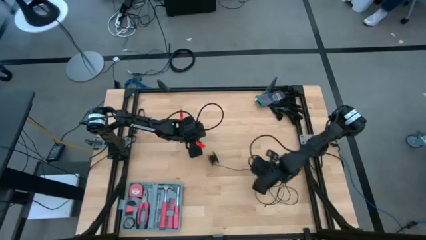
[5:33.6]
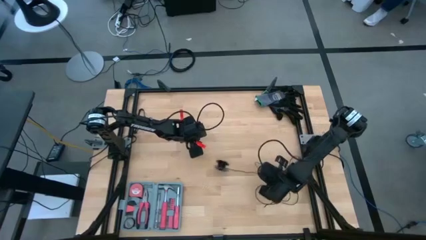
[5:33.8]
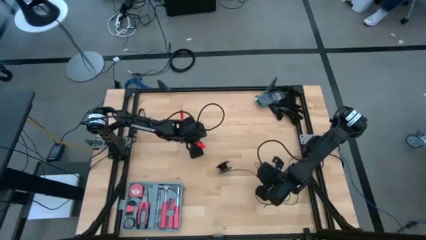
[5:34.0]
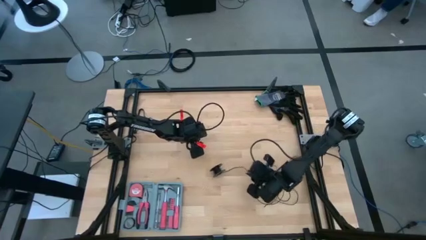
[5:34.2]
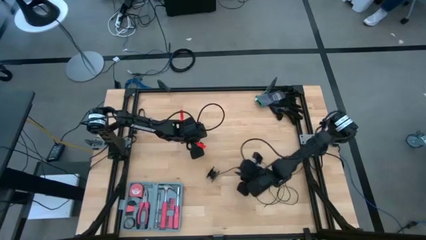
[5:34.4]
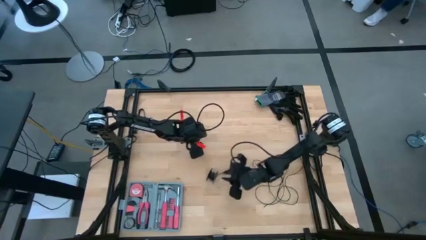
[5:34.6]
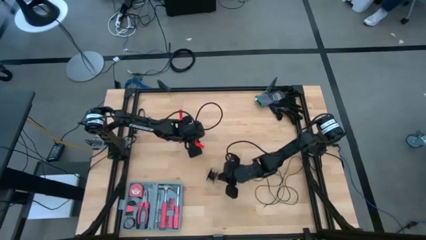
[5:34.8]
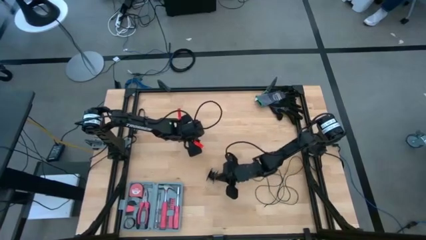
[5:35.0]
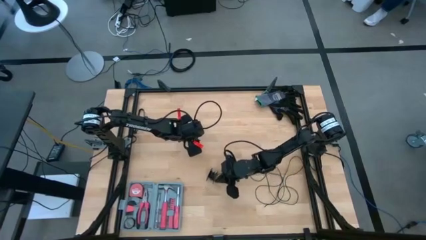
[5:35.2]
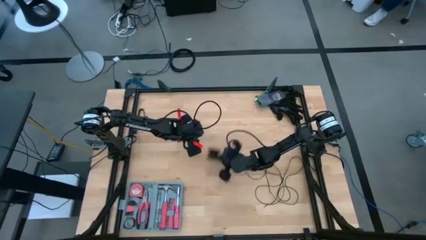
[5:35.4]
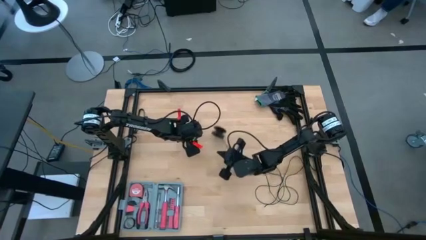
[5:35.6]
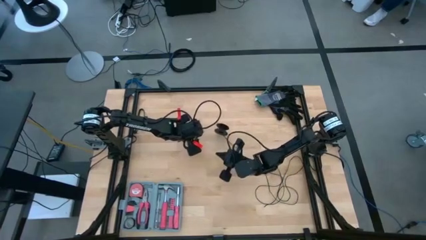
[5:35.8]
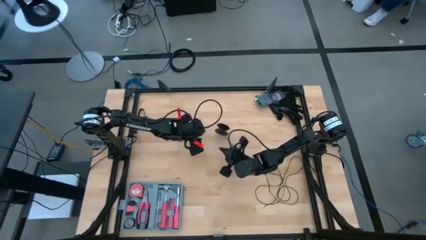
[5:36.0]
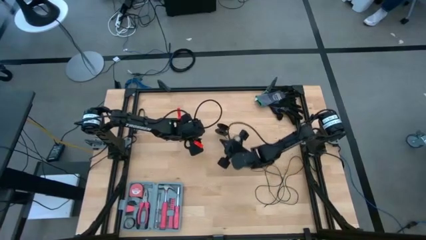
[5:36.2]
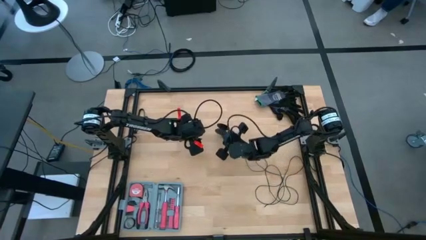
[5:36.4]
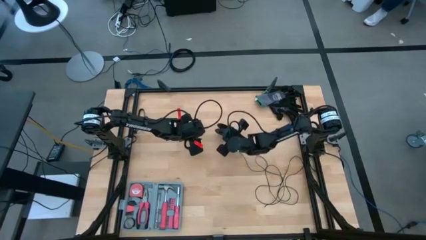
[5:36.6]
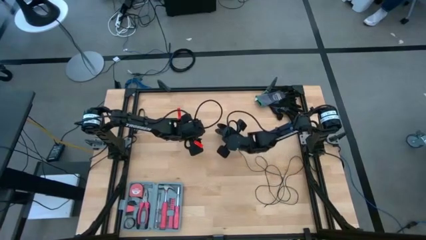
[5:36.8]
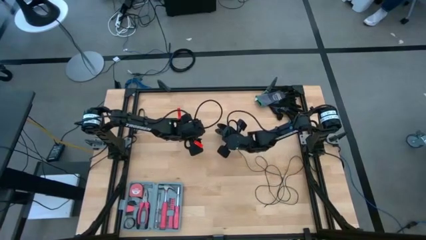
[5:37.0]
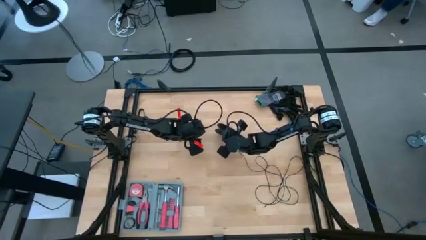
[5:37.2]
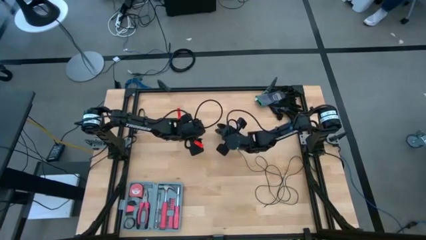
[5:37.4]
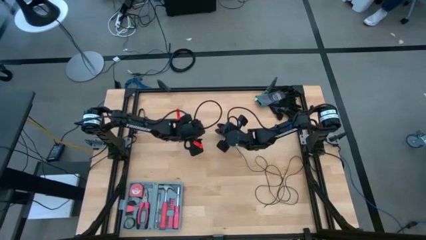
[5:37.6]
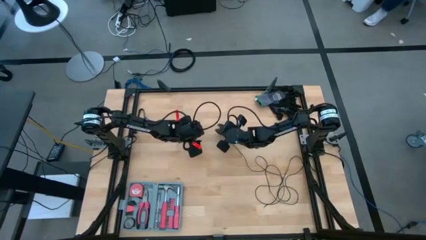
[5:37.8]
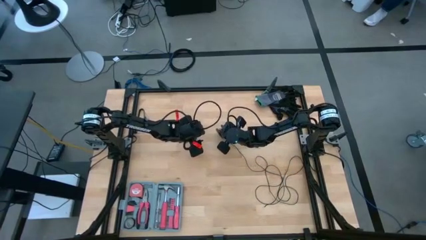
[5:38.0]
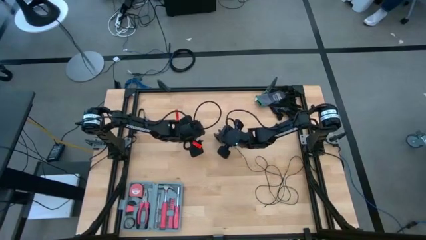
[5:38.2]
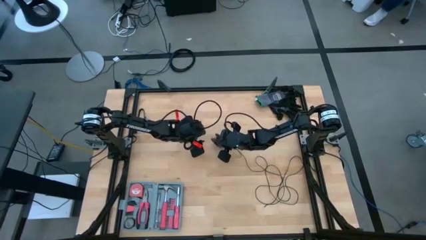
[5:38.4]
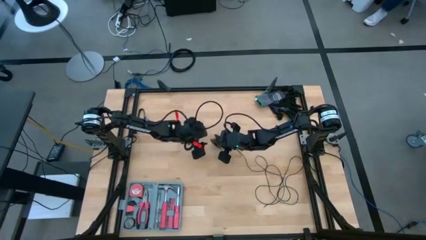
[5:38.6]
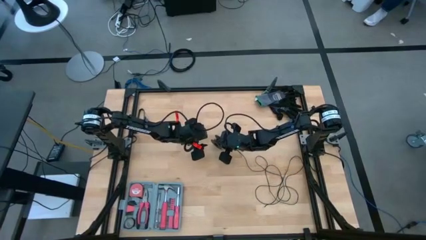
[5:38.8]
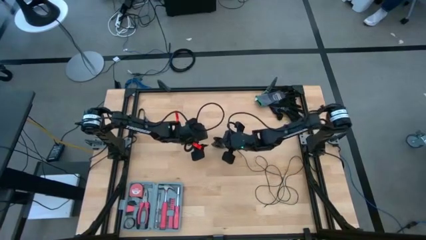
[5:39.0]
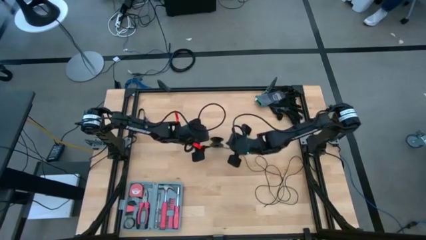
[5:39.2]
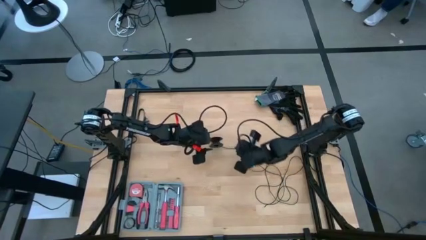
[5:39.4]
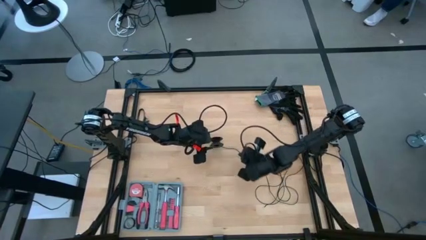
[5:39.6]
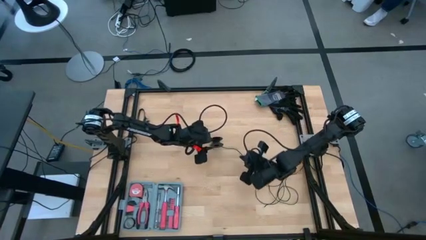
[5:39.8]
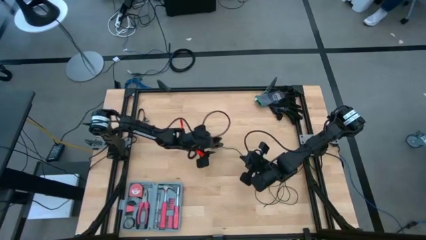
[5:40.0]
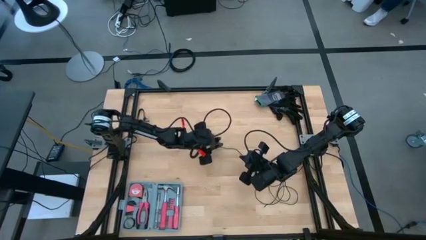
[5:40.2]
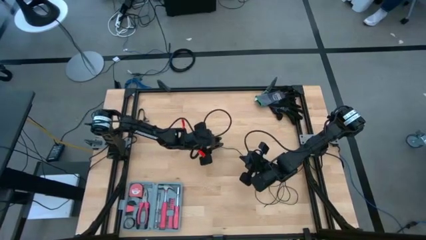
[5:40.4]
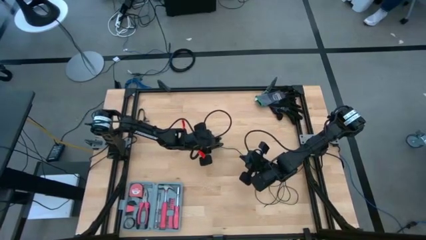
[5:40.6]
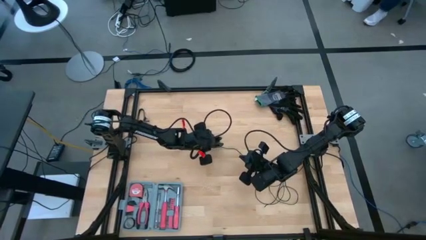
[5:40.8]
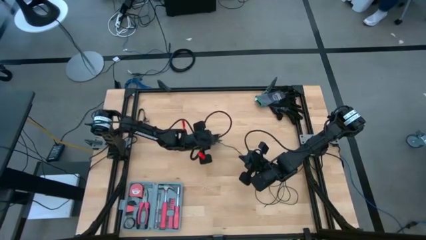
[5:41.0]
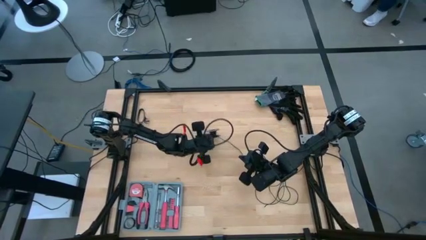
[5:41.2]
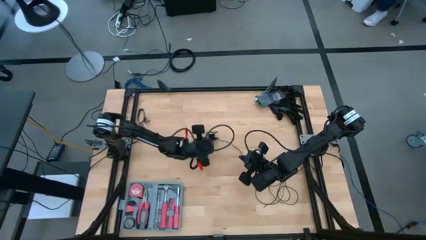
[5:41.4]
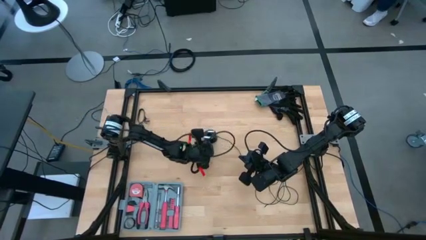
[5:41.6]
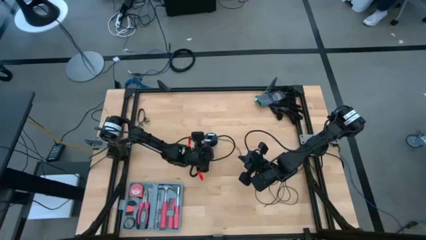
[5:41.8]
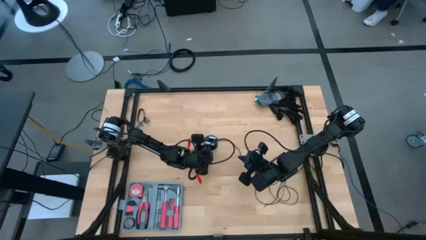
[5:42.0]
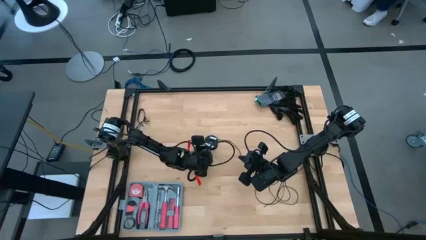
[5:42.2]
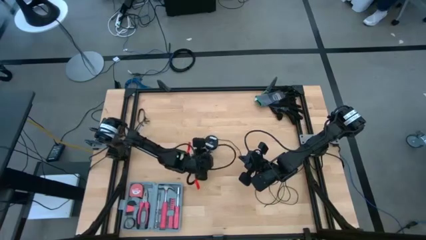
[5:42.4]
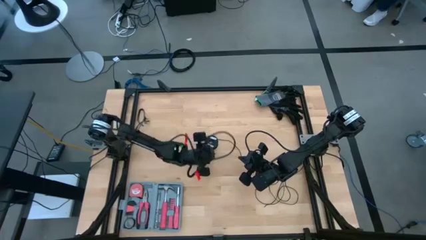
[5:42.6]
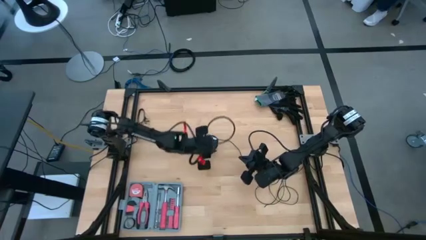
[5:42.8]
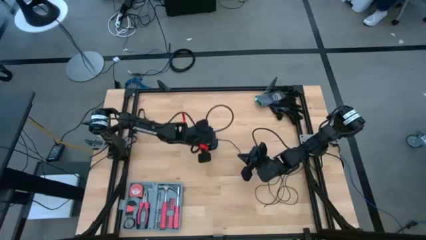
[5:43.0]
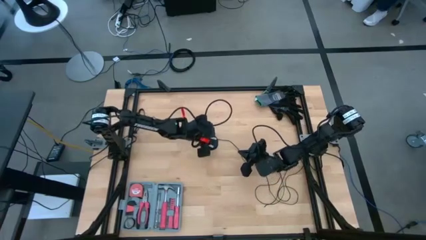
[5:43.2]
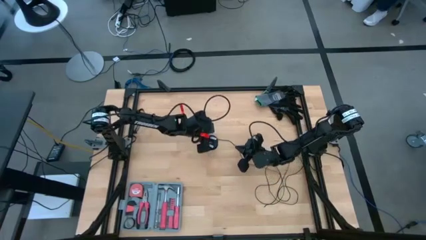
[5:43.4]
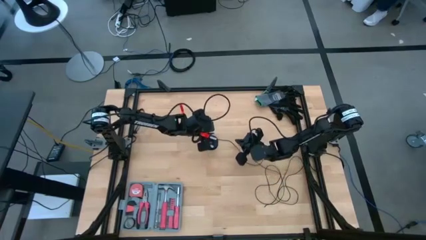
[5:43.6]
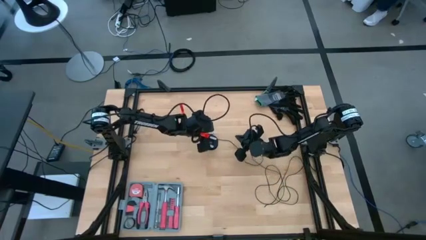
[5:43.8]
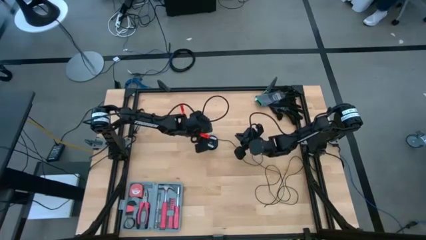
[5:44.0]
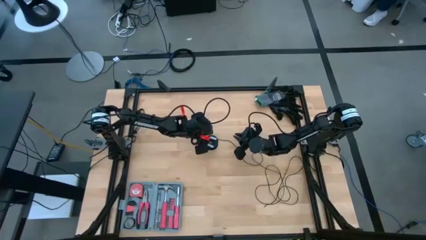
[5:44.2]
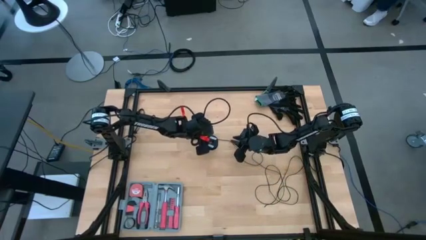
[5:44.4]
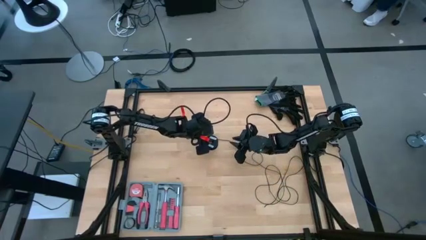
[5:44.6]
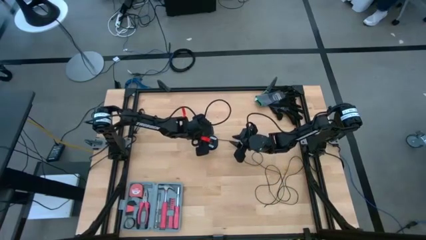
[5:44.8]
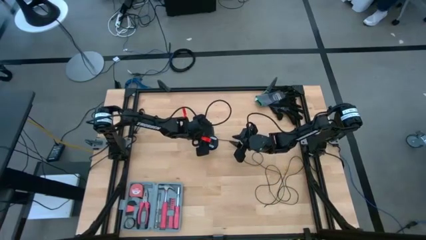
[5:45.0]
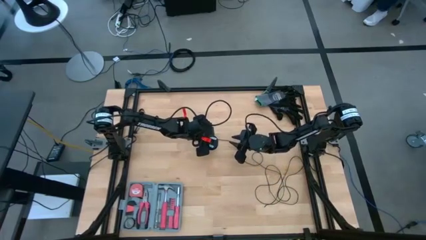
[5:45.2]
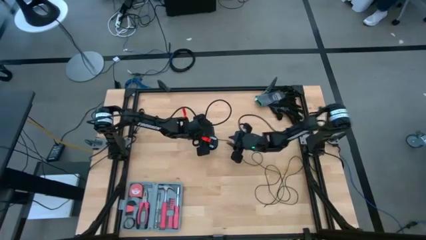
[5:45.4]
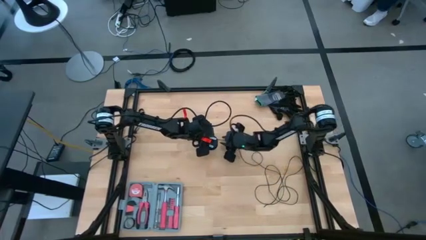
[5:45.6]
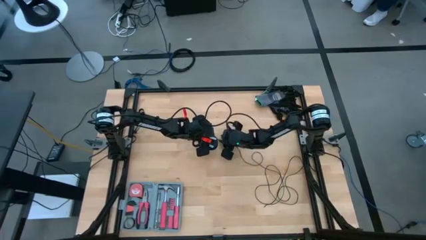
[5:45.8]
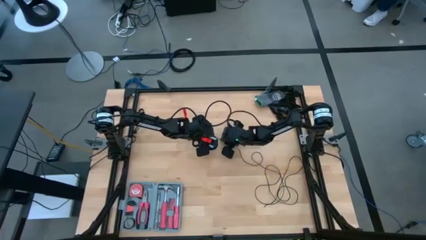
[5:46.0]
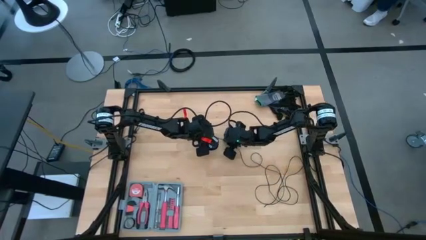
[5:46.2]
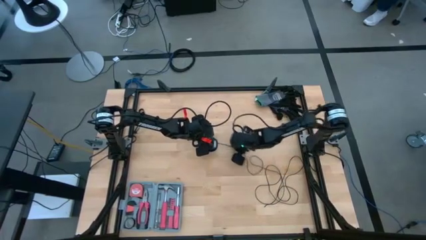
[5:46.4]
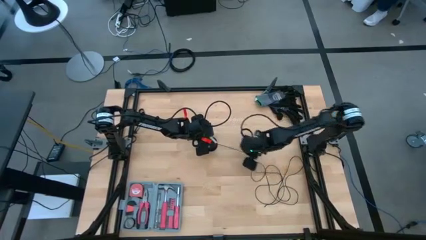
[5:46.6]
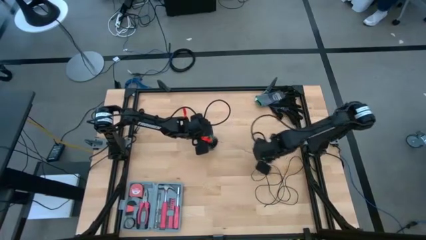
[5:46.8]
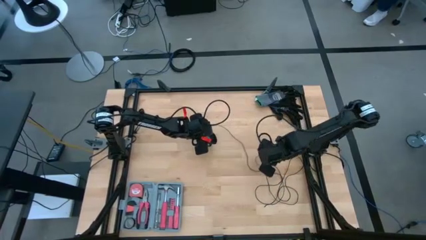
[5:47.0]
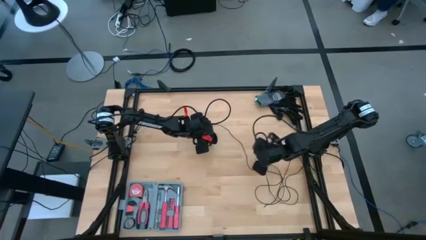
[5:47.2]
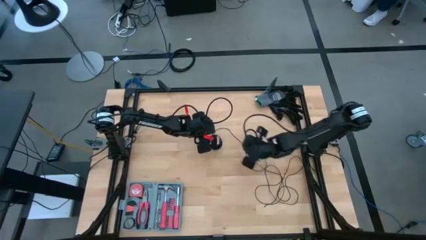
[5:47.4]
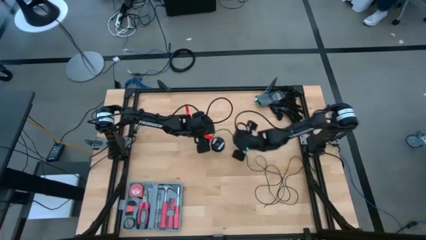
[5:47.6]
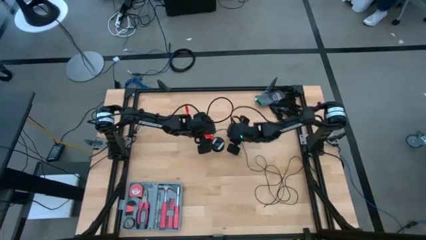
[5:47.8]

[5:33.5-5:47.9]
Task: Coil cords
Uncoil the black wire from the spool
